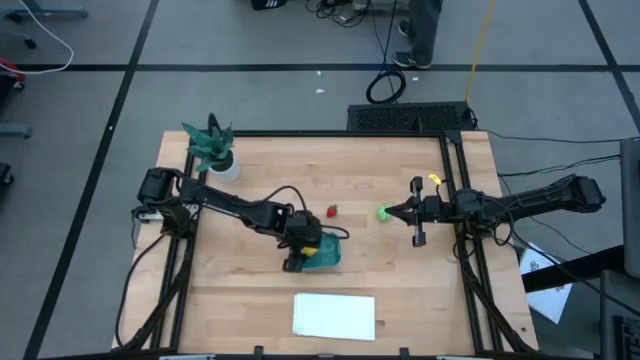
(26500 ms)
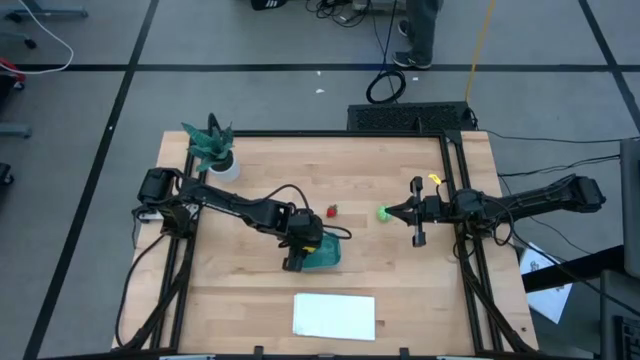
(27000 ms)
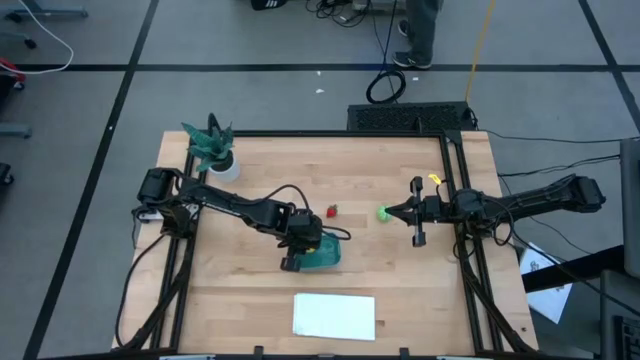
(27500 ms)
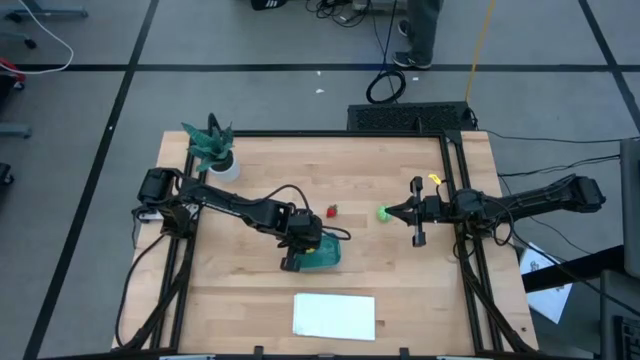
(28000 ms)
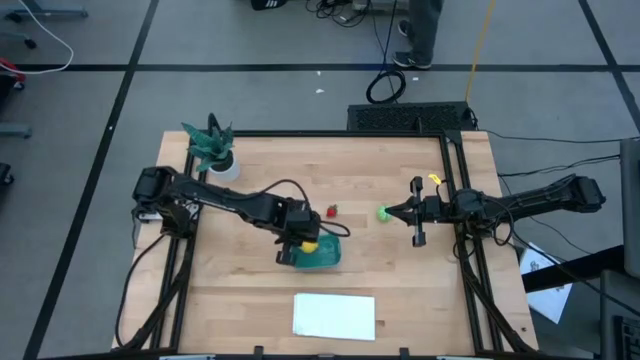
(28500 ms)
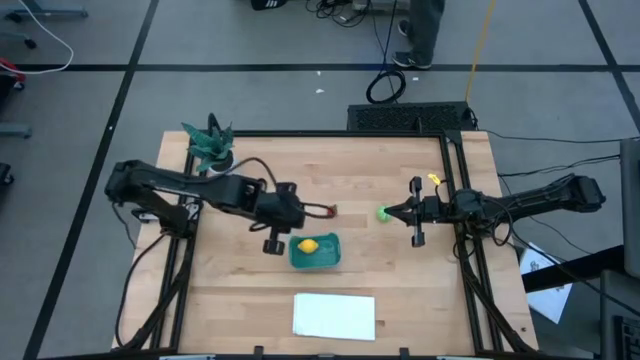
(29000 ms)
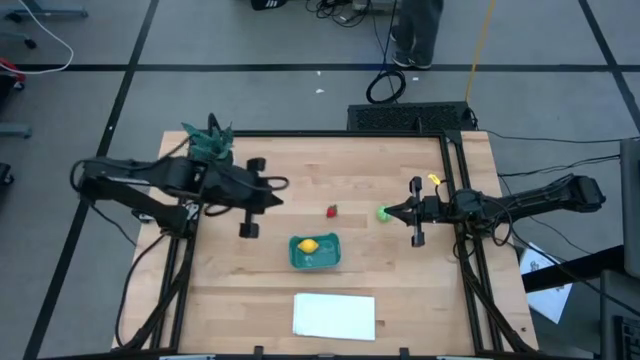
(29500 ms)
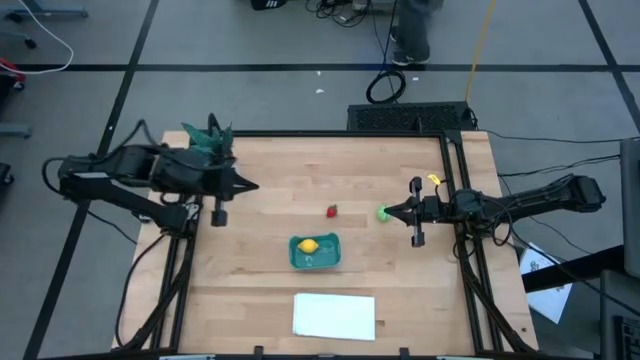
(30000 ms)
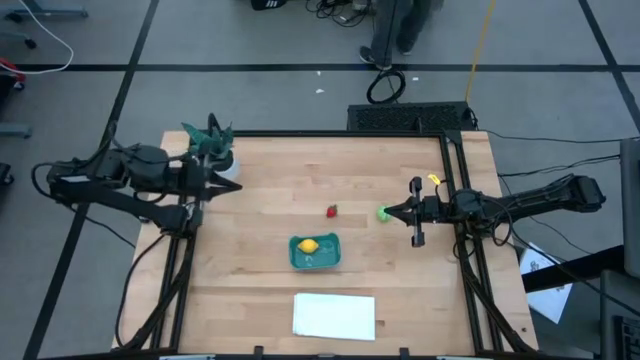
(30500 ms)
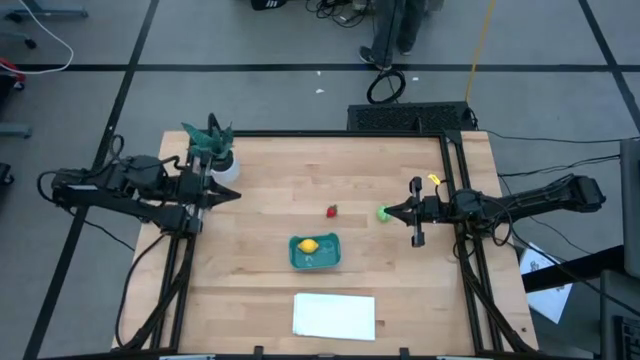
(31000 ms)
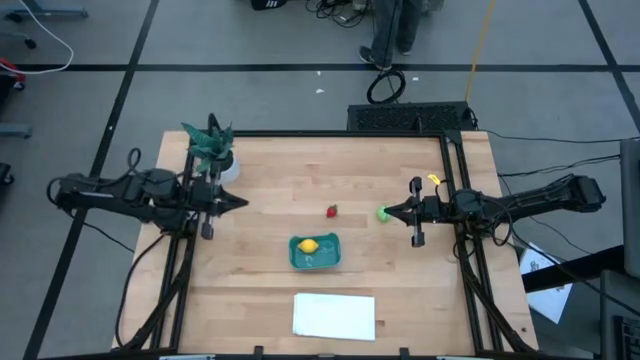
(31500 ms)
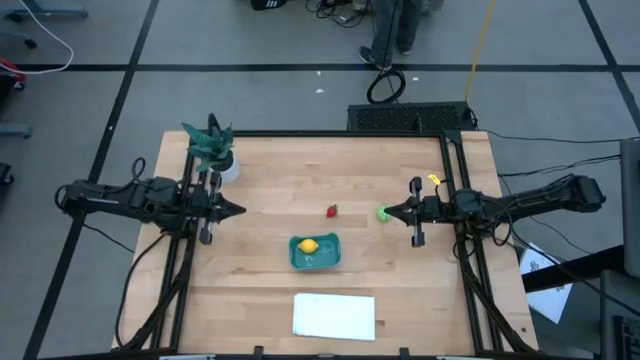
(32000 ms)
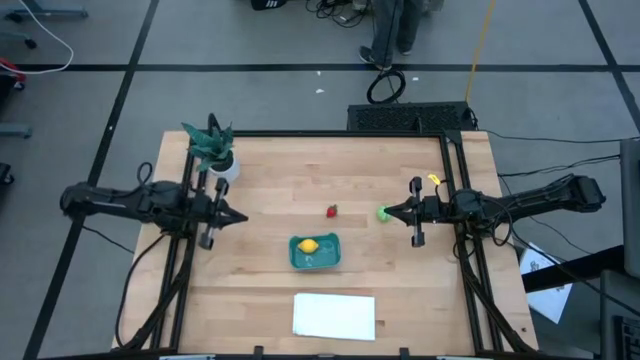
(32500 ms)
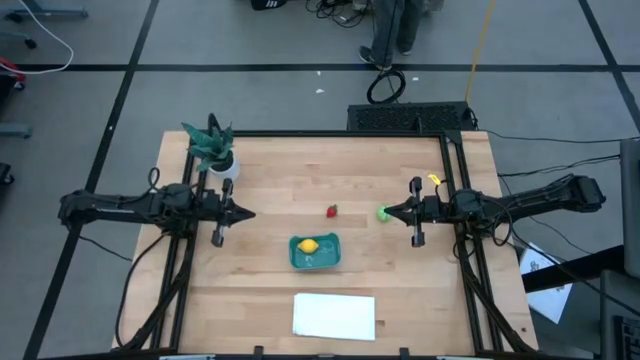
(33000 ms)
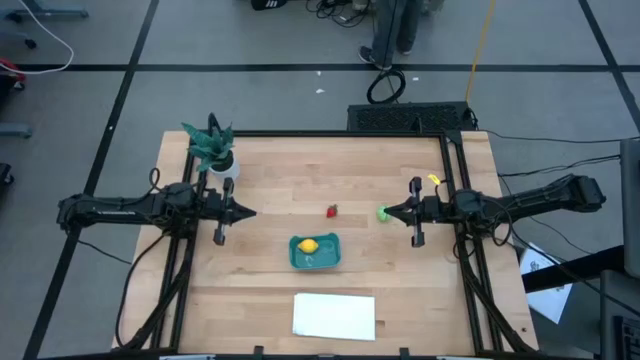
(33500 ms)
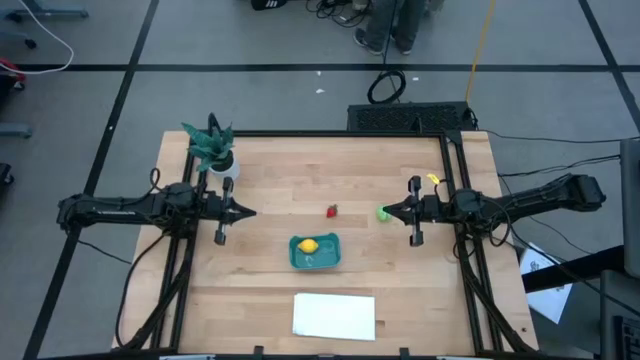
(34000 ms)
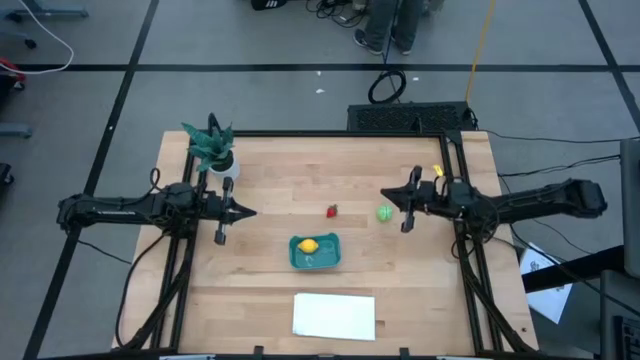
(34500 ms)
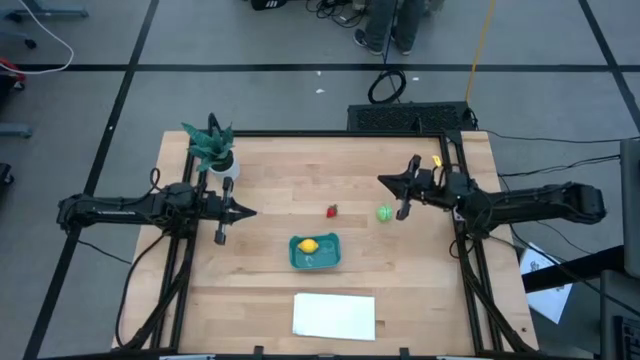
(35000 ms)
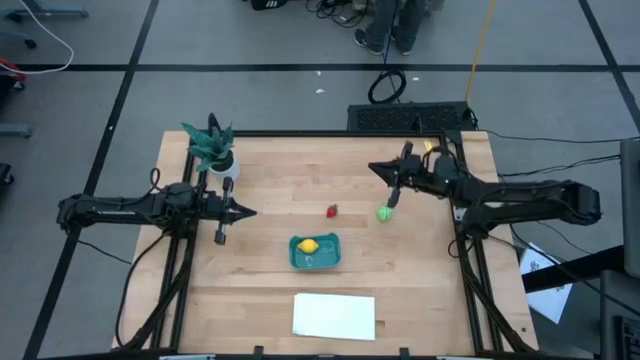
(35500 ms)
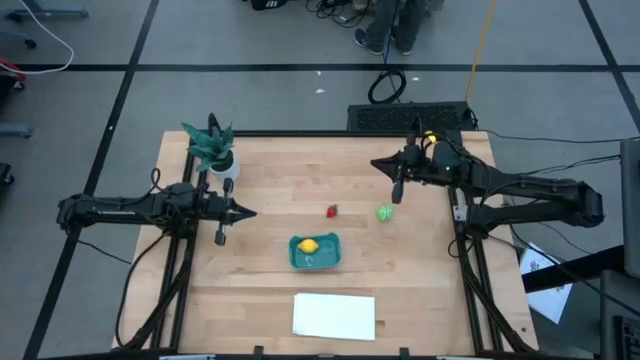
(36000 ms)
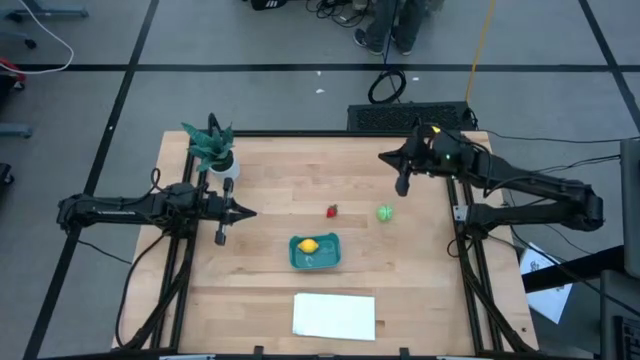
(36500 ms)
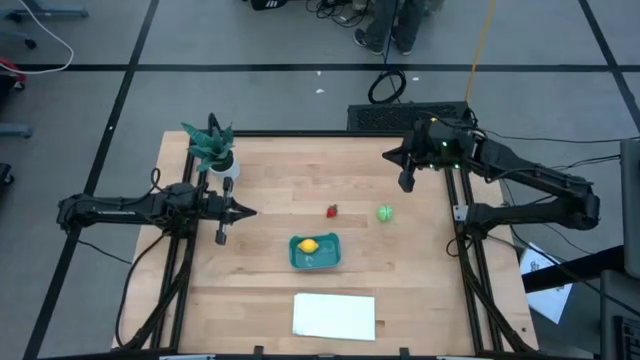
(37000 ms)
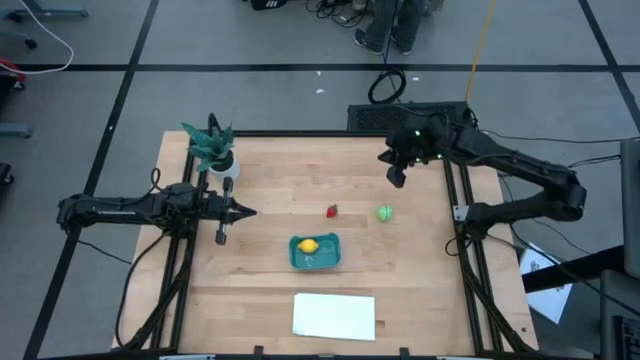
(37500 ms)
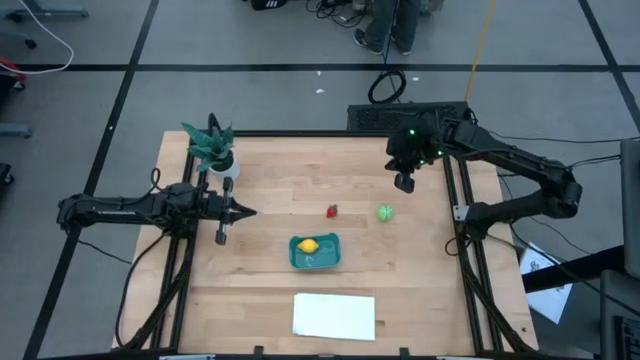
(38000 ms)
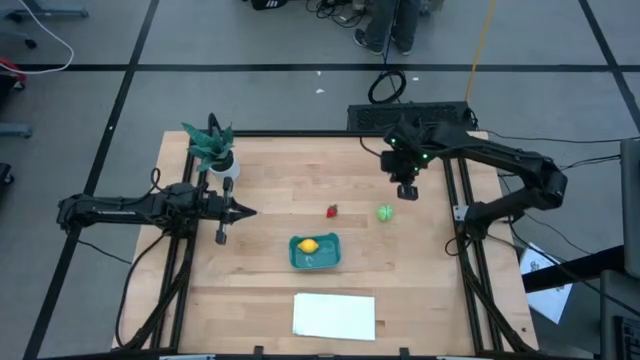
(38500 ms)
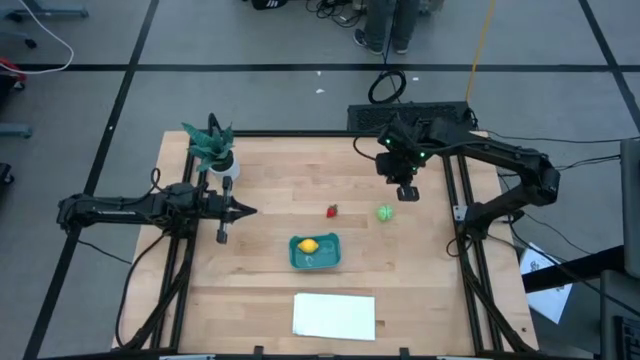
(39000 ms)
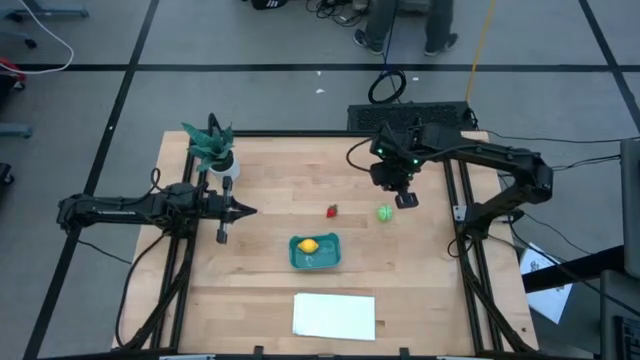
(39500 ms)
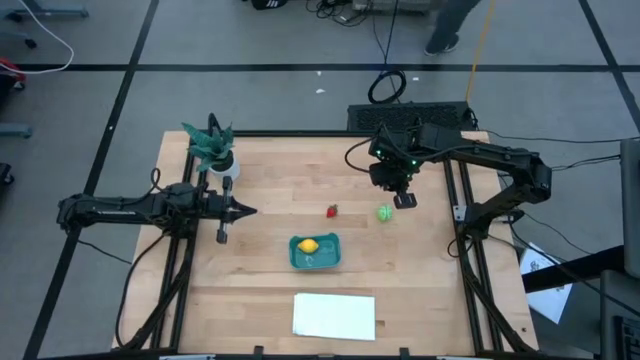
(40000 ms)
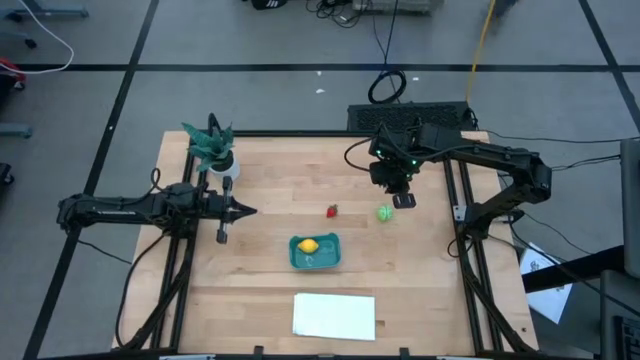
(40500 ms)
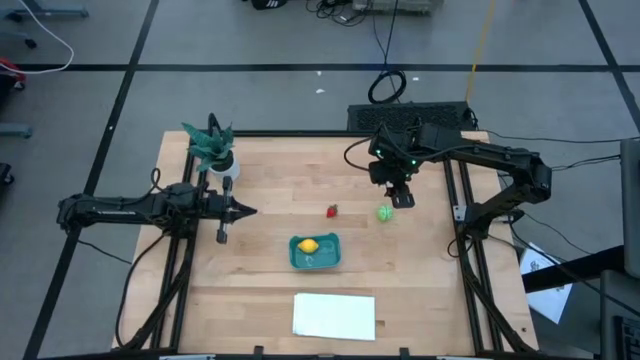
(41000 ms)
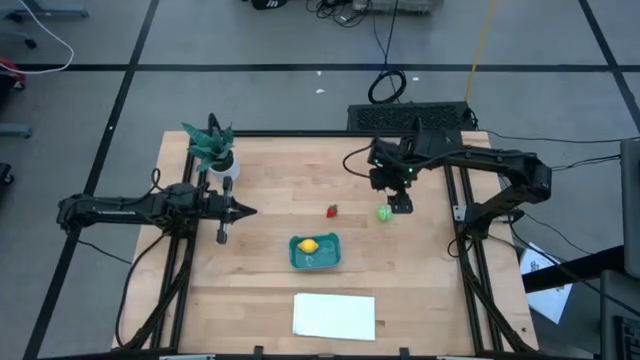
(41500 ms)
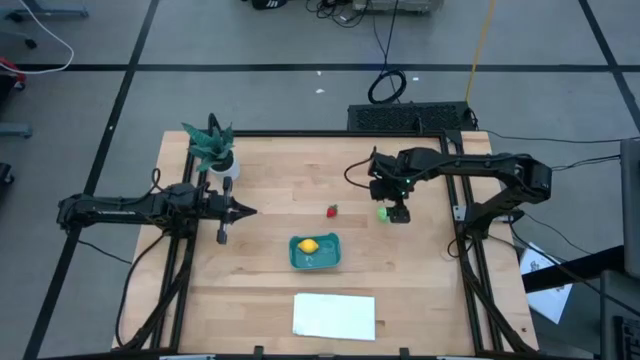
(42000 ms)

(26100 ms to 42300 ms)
Task: Pick and placing Produce into tupperware
Put the green cabbage into the blue bin

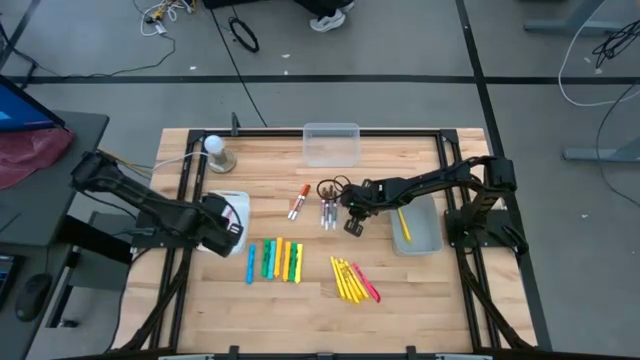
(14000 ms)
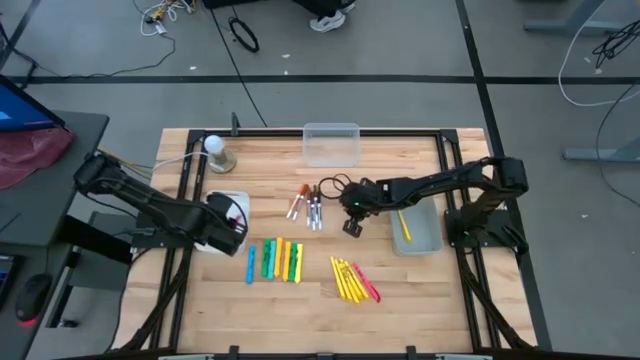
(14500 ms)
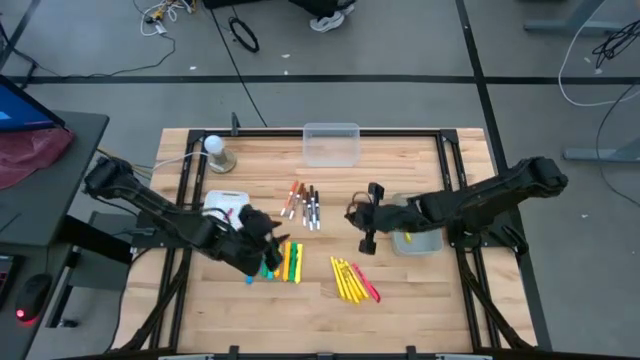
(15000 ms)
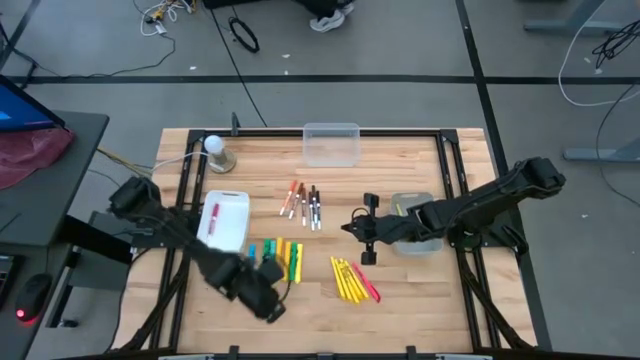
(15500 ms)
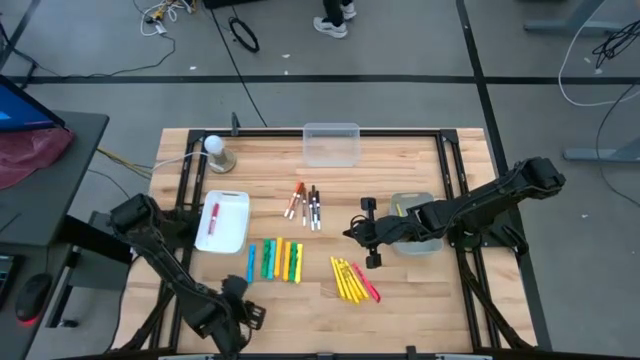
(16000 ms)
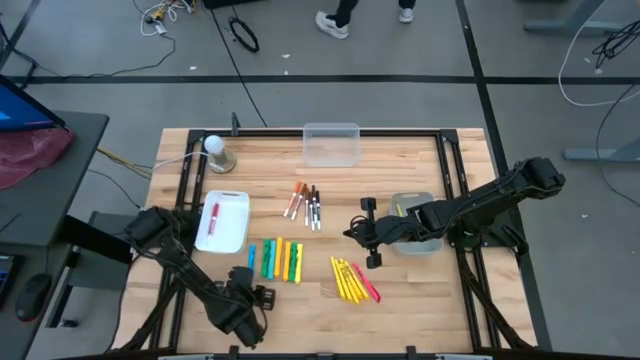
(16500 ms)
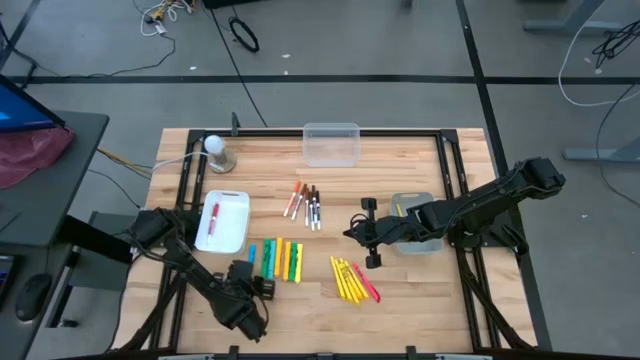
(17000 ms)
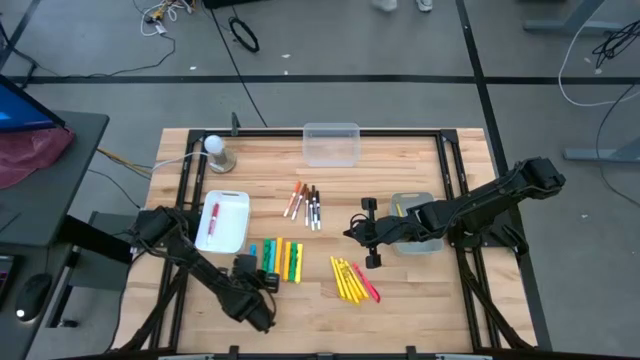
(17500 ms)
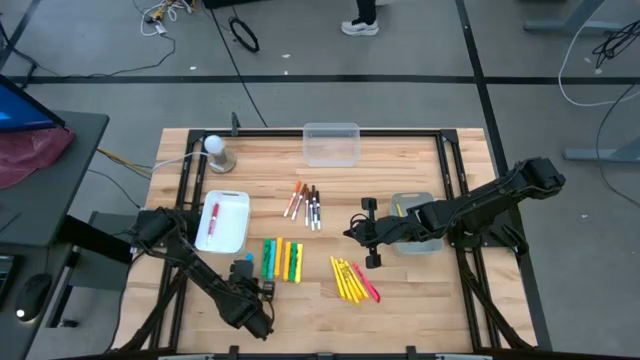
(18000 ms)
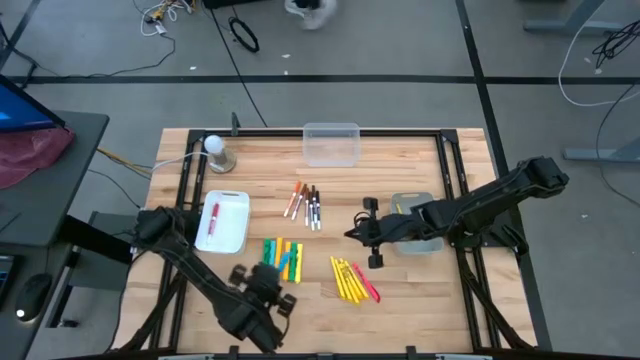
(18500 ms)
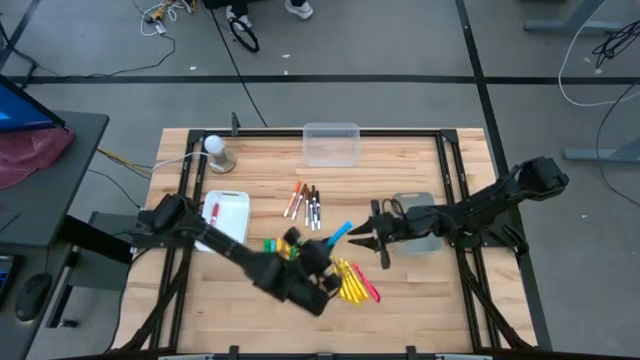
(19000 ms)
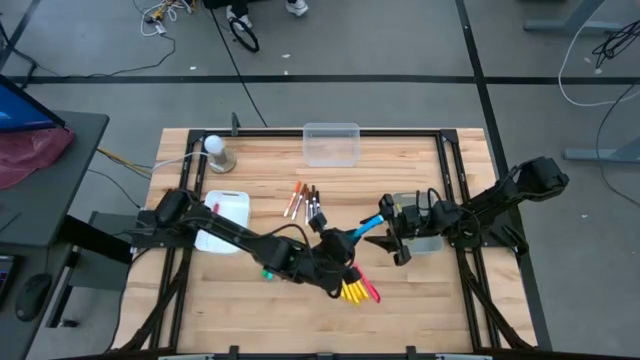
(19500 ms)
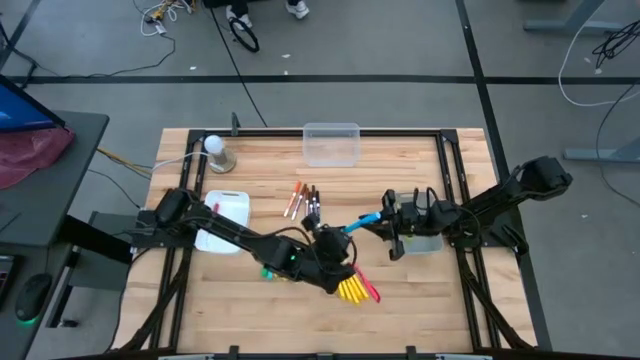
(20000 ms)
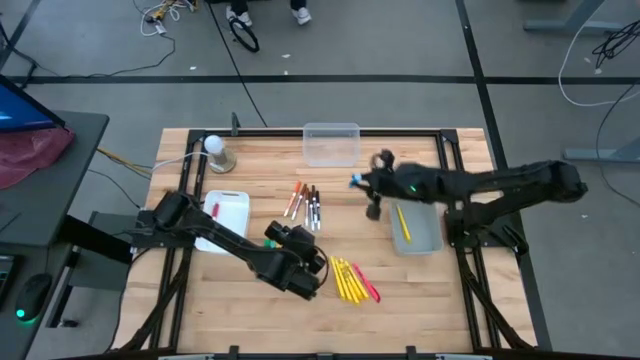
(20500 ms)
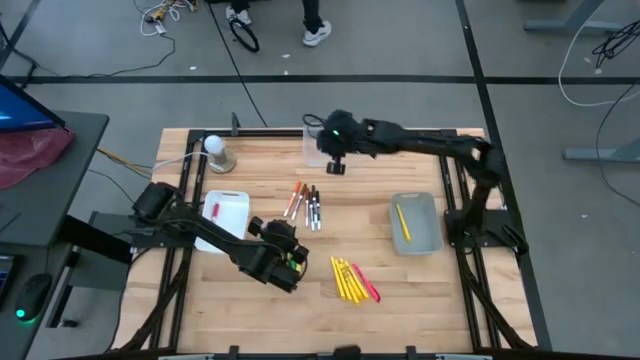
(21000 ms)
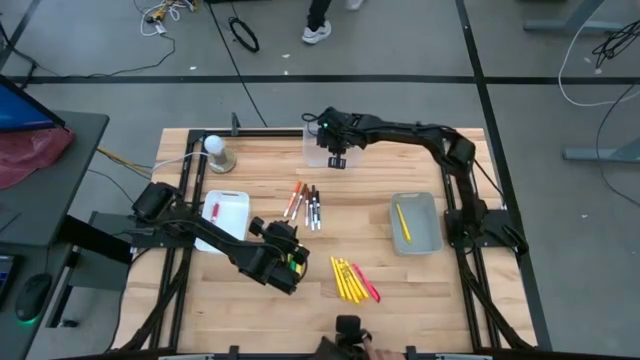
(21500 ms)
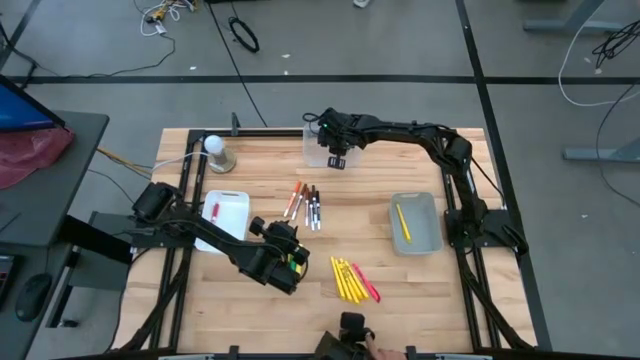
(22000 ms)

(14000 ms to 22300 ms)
Task: Pick & Place Markers
Put the blue highlighter pen into the transparent bin
